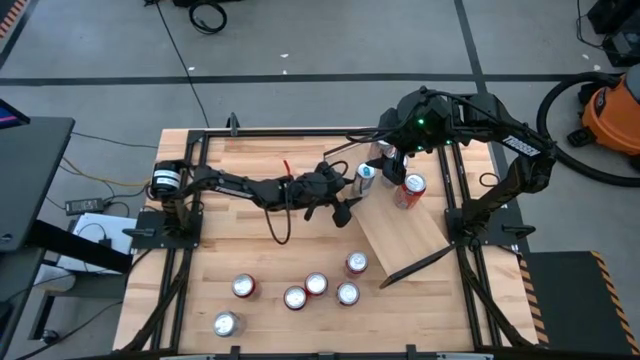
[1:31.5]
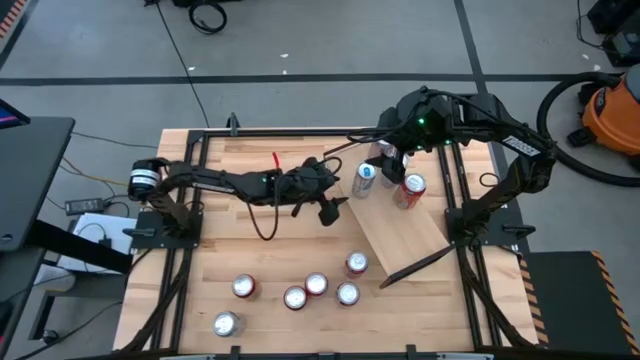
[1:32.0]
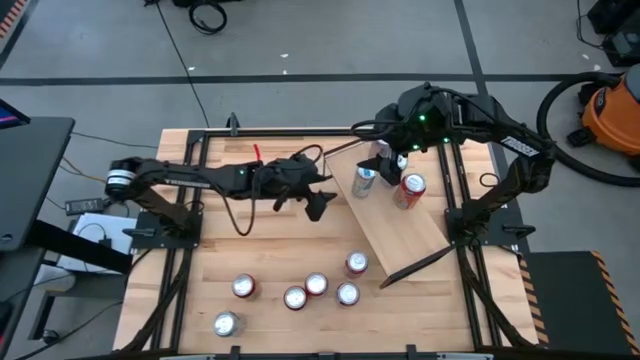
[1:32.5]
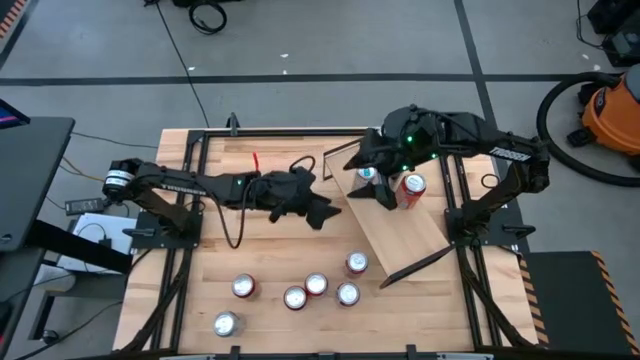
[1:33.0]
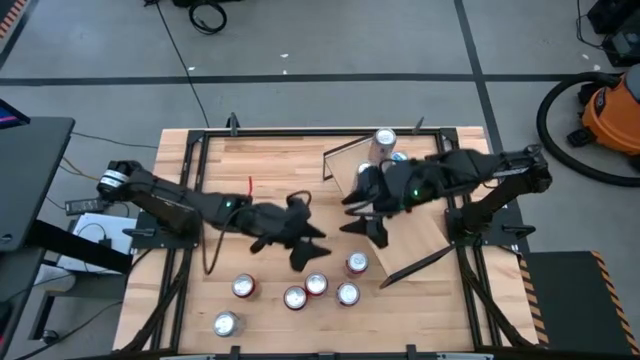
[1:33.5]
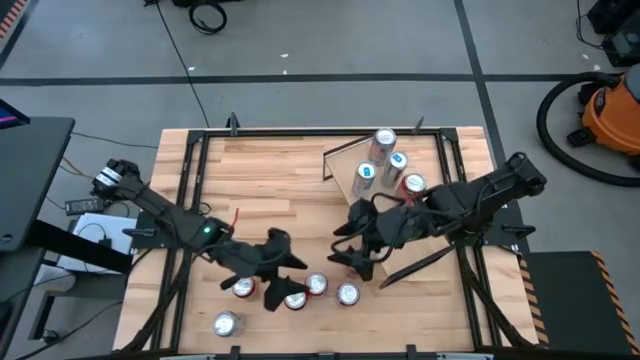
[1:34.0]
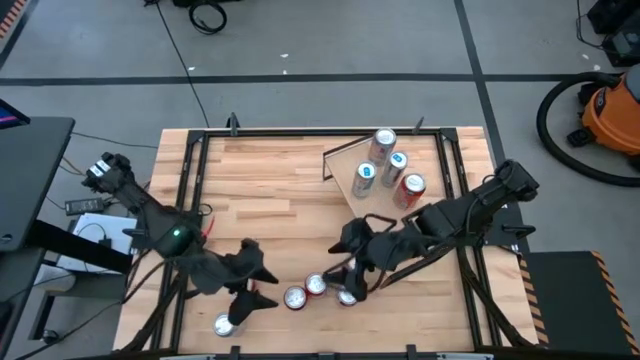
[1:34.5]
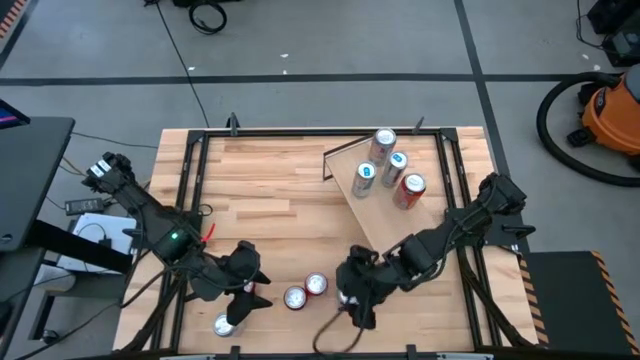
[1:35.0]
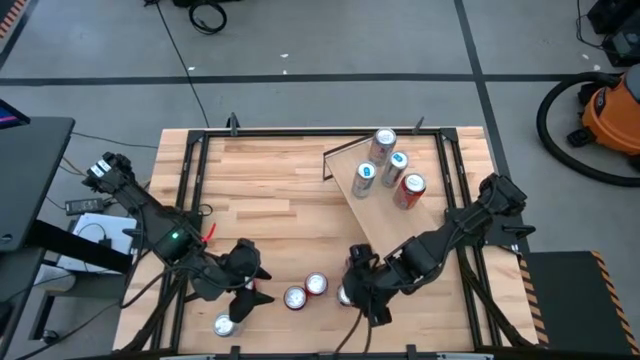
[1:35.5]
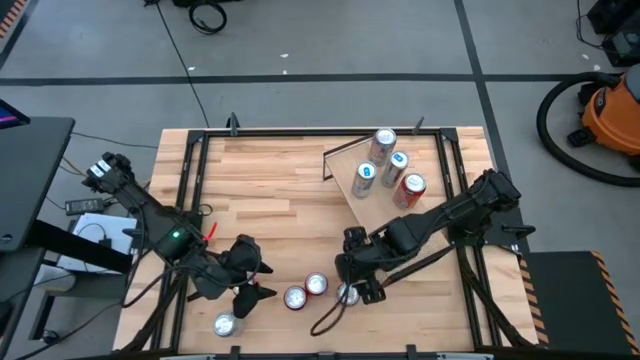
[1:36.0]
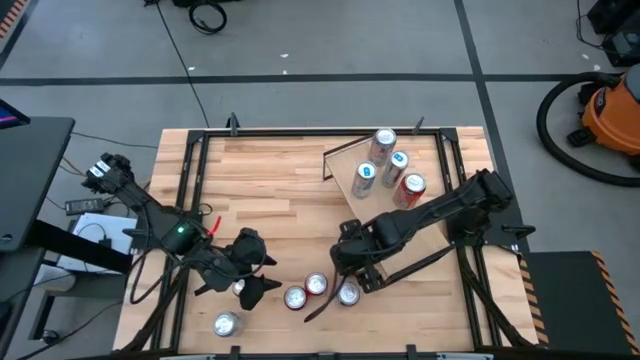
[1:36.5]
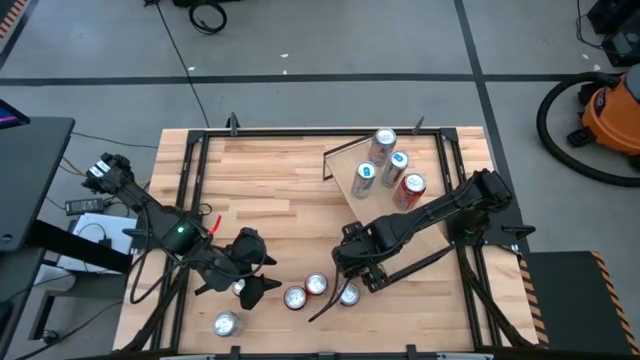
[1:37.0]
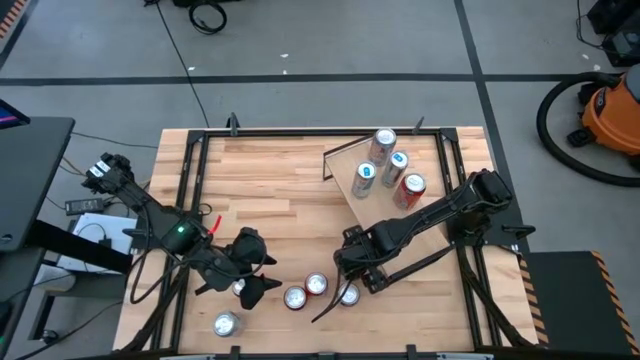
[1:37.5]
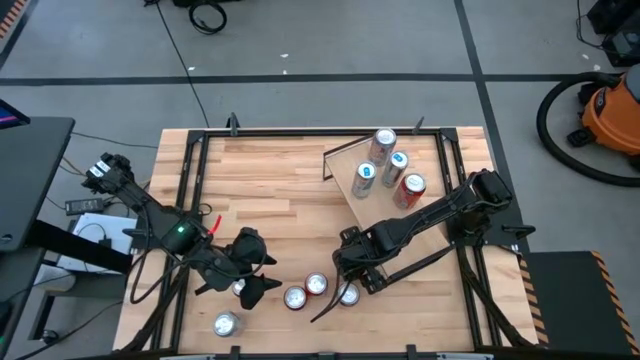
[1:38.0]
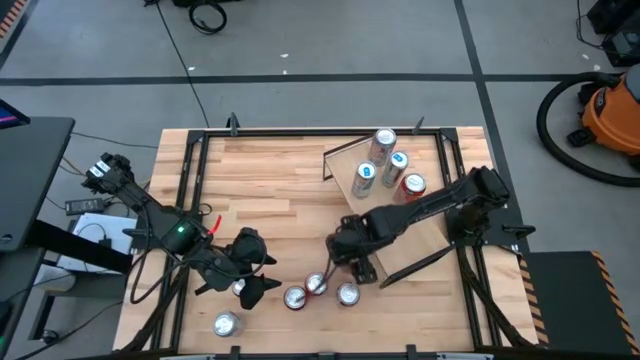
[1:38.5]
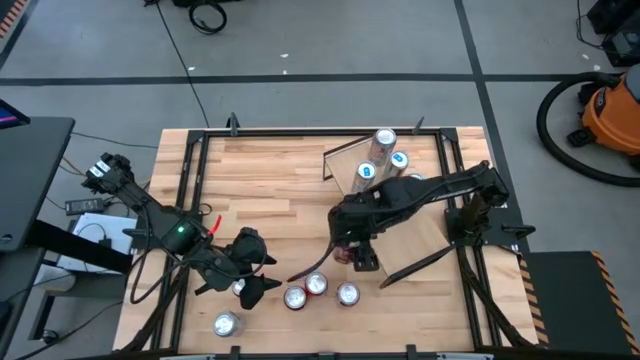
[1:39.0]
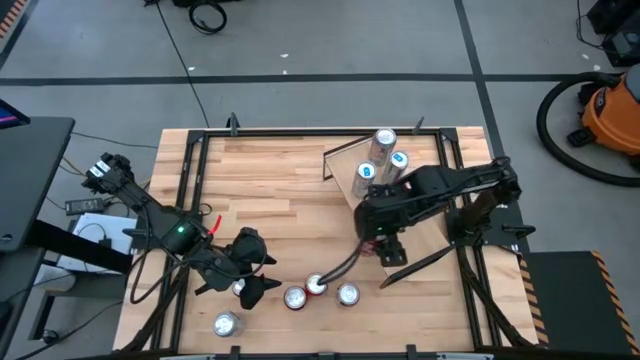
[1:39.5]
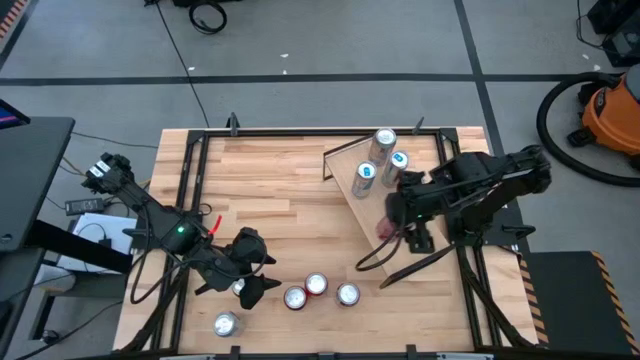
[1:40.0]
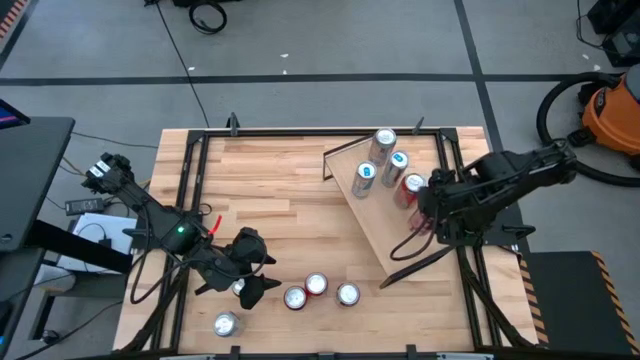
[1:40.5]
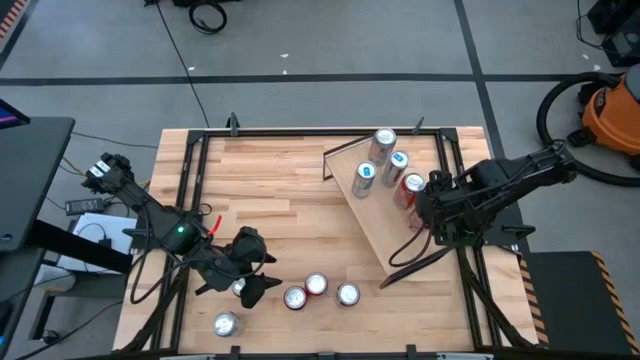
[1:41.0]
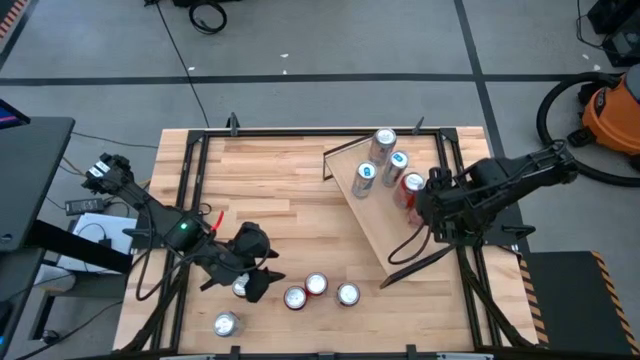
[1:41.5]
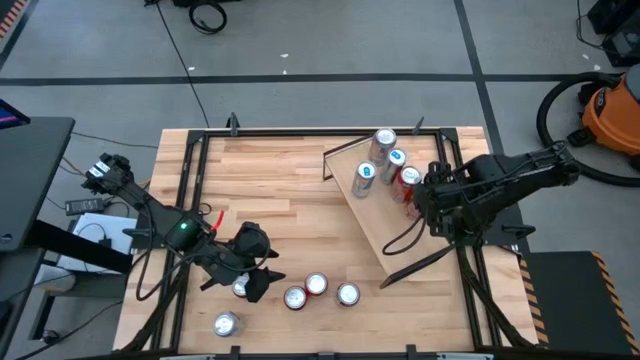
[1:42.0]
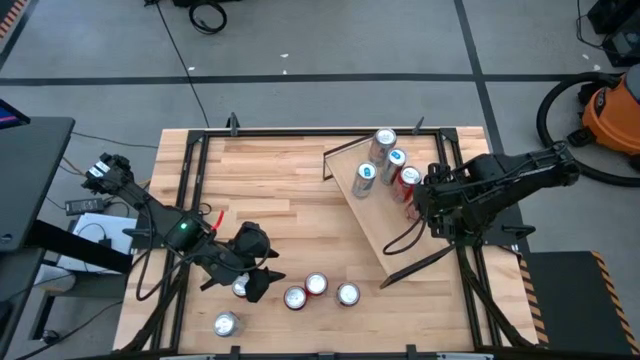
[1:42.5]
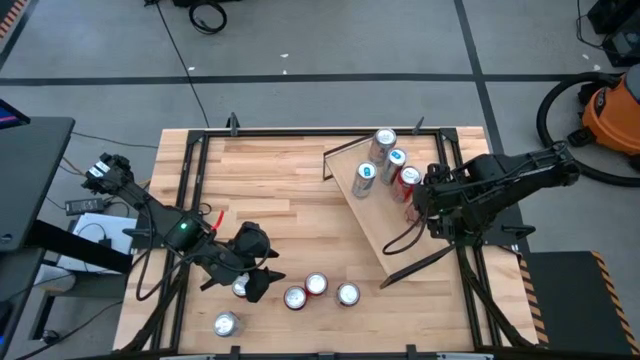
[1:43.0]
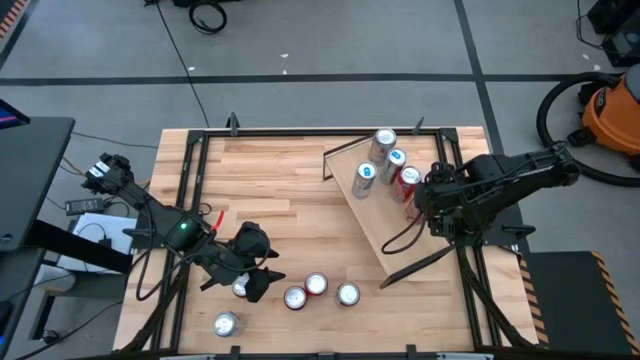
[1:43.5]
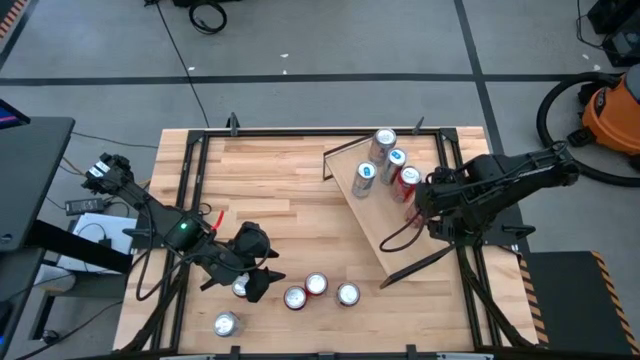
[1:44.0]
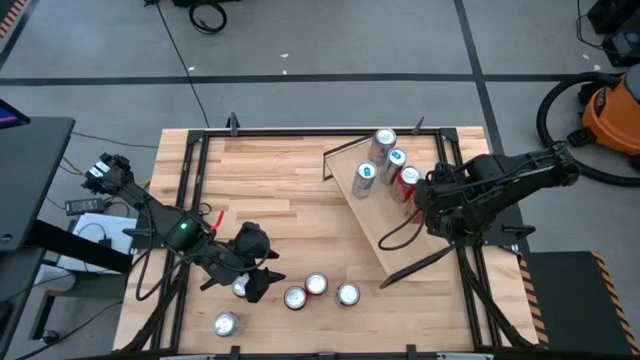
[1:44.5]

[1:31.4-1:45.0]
Task: Place canned beverage on shelf
Put the top right red soda can on the shelf

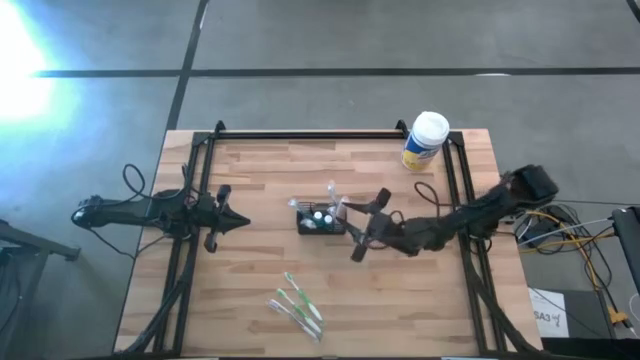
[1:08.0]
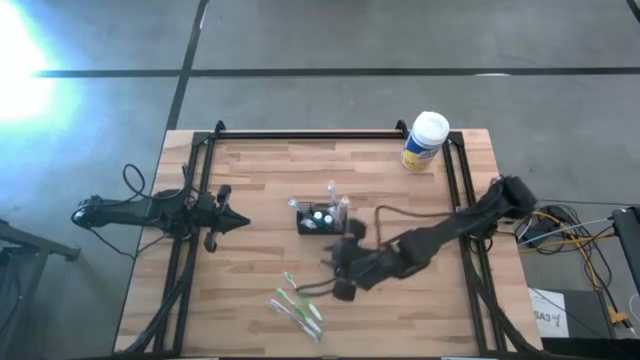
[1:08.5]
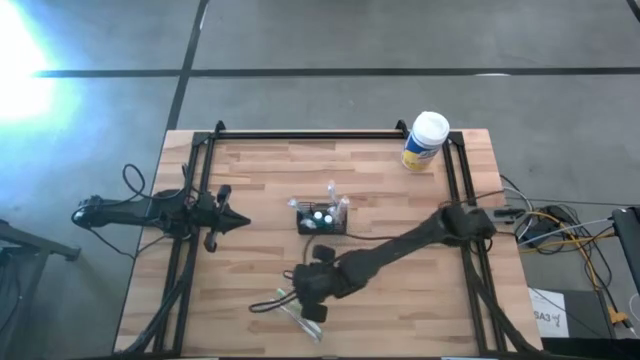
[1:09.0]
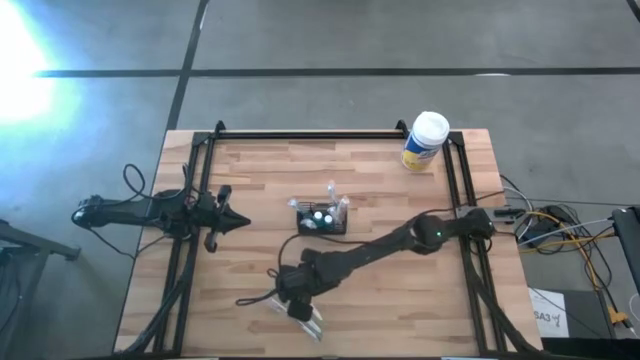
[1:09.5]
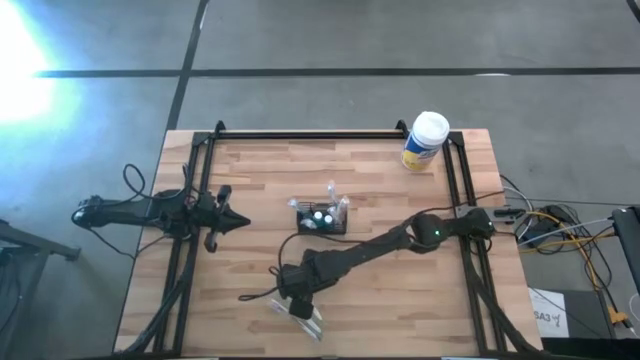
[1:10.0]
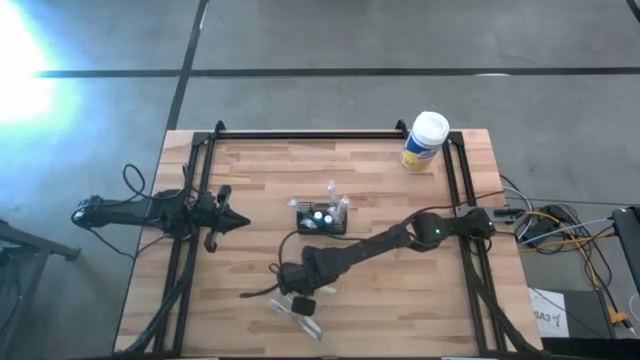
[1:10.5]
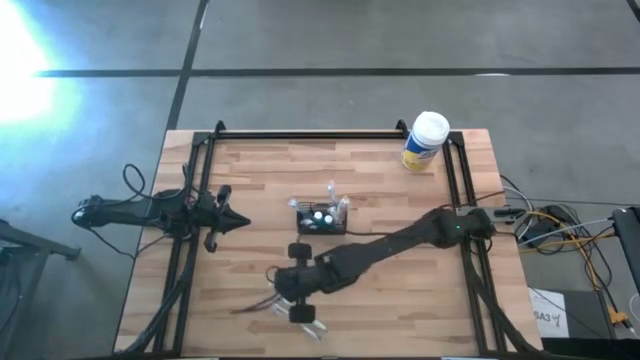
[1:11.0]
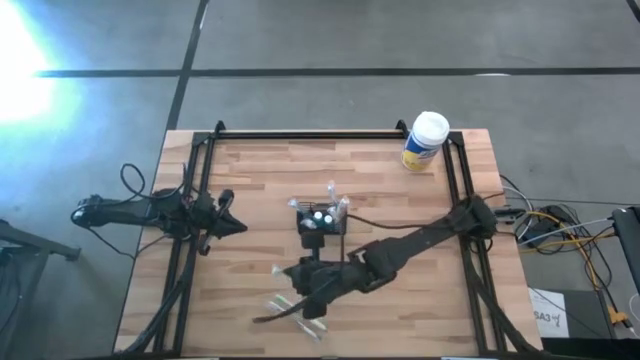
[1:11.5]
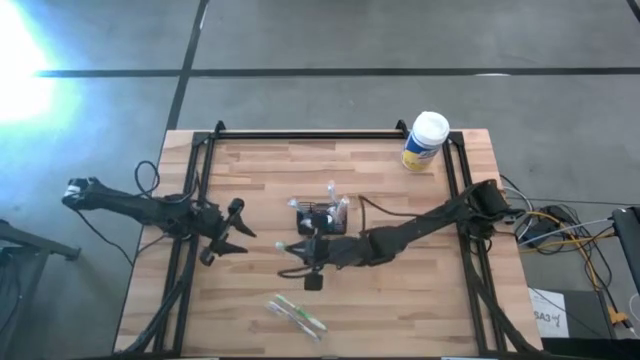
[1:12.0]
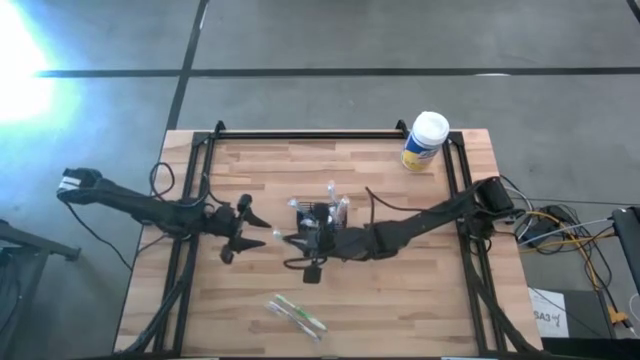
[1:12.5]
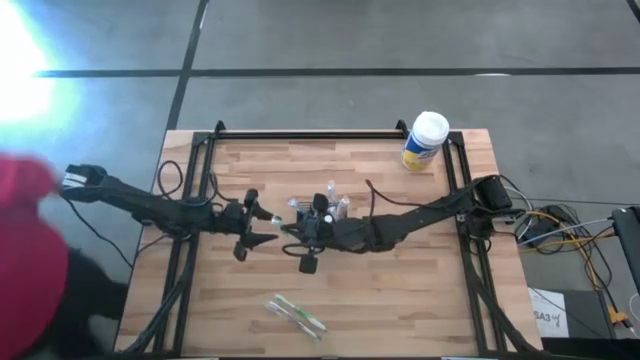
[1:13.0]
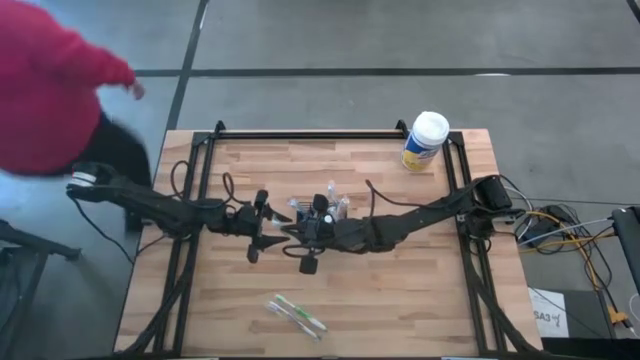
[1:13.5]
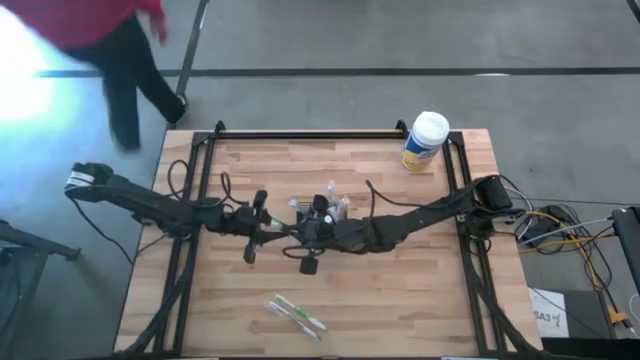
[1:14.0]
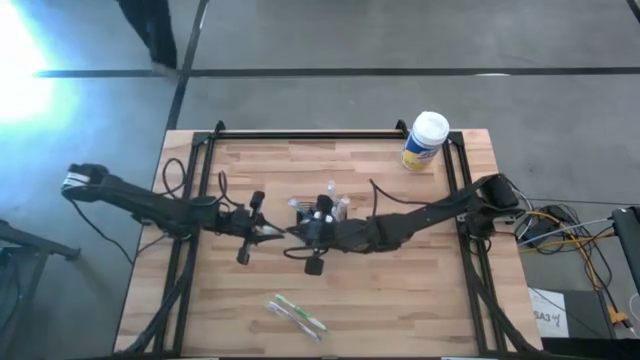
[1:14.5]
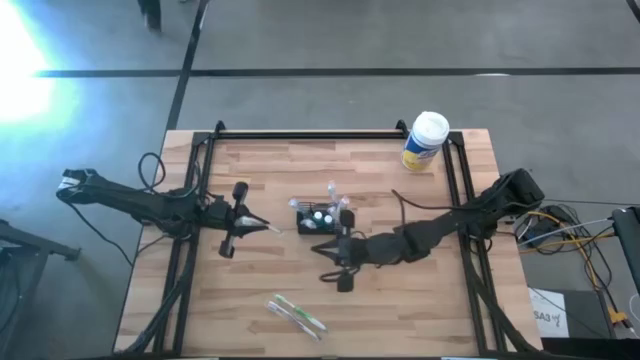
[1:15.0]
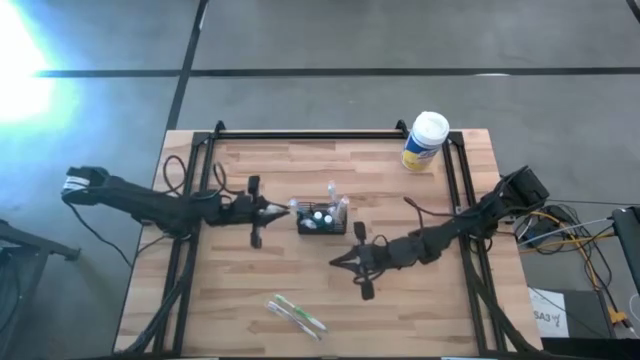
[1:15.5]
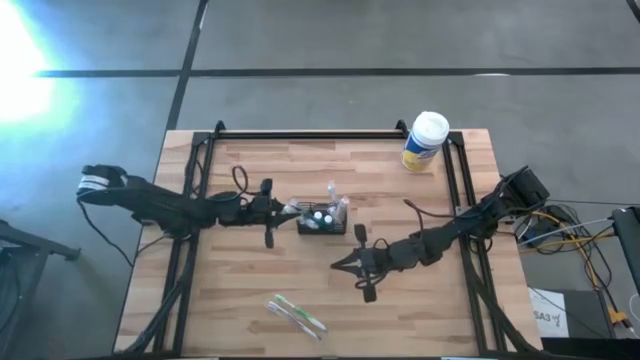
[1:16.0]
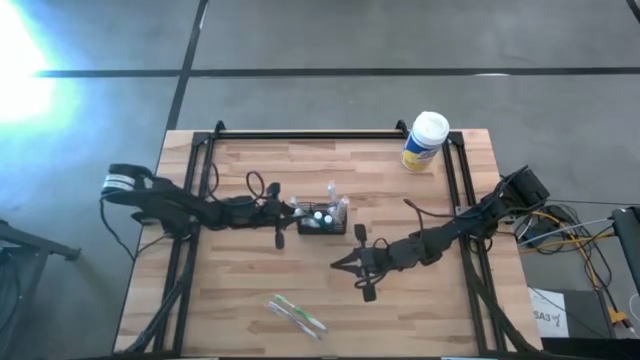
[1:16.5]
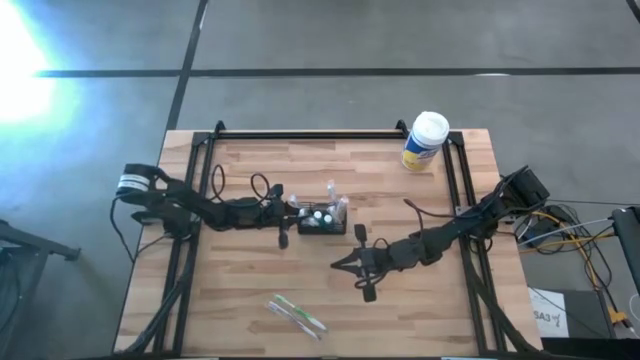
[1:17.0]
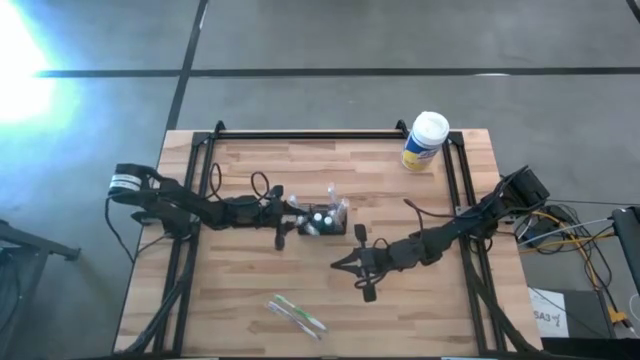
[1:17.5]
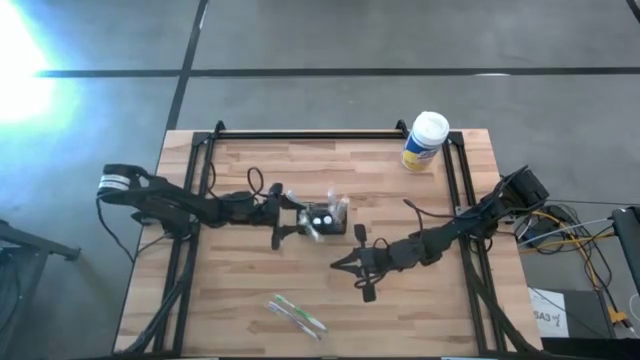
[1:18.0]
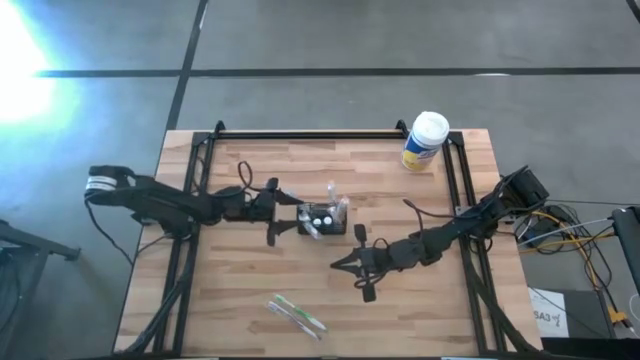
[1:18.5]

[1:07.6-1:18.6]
Task: Pick & Place toothbrushing station
Put the top green toothbrush into the black mesh organizer
